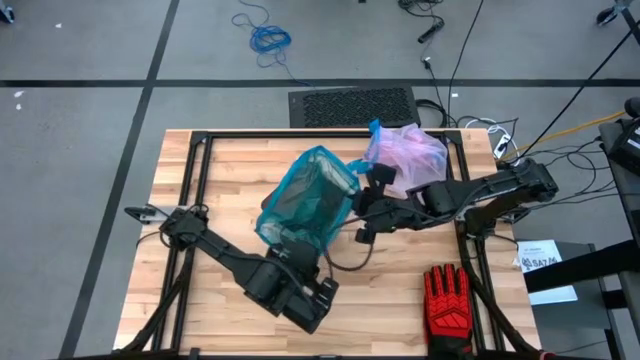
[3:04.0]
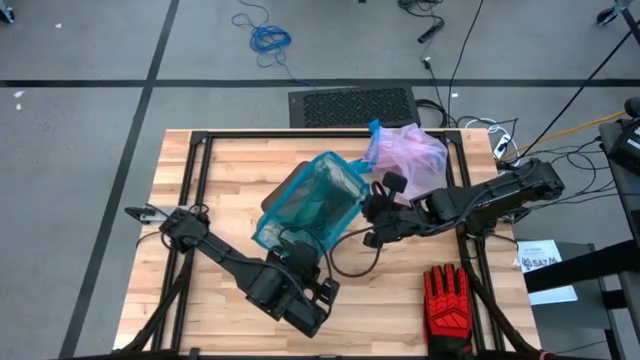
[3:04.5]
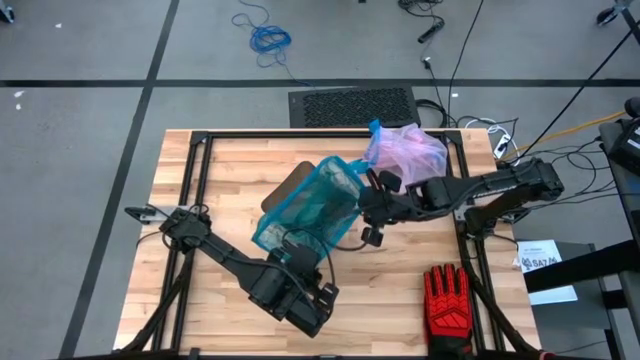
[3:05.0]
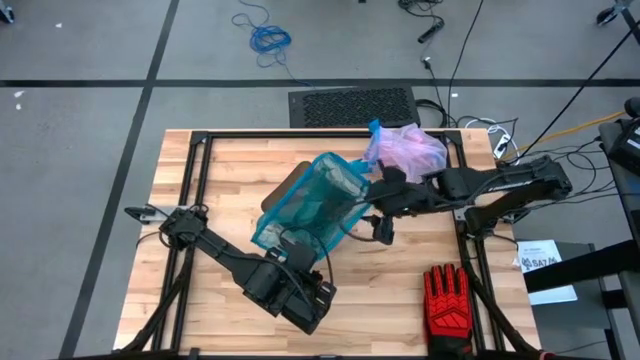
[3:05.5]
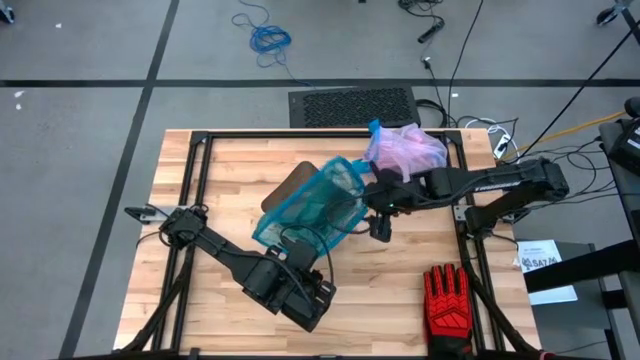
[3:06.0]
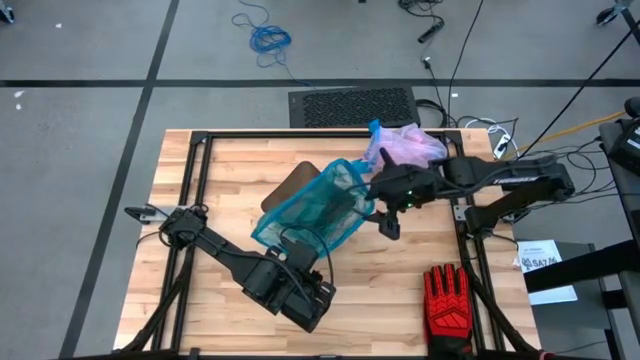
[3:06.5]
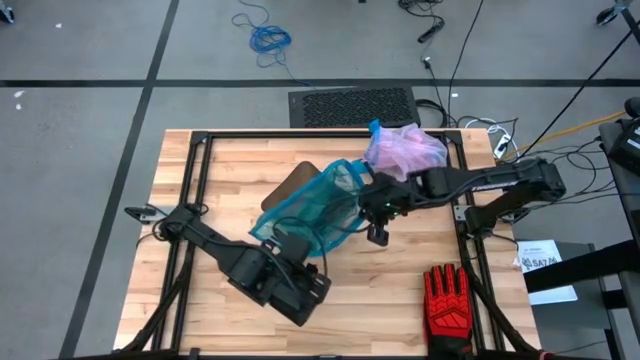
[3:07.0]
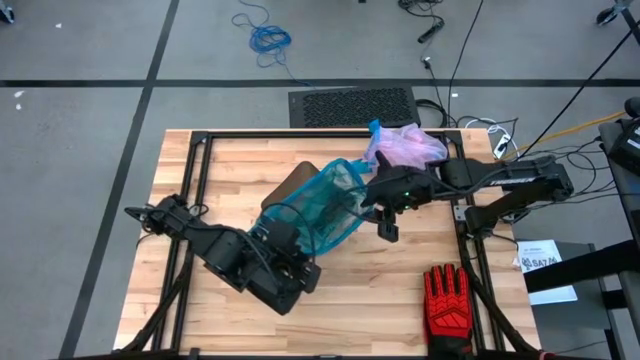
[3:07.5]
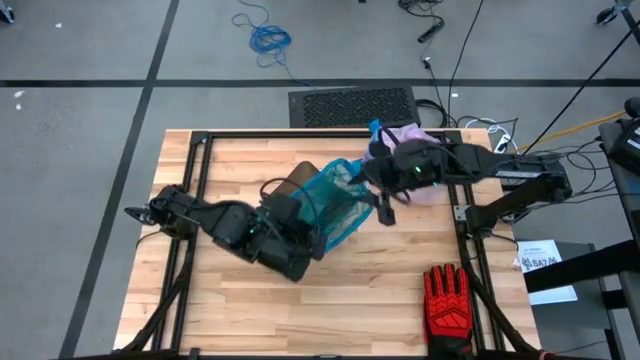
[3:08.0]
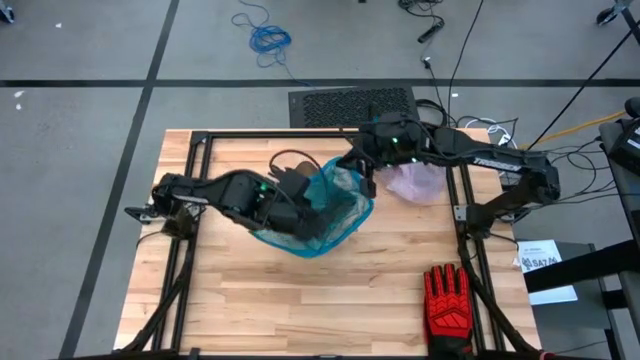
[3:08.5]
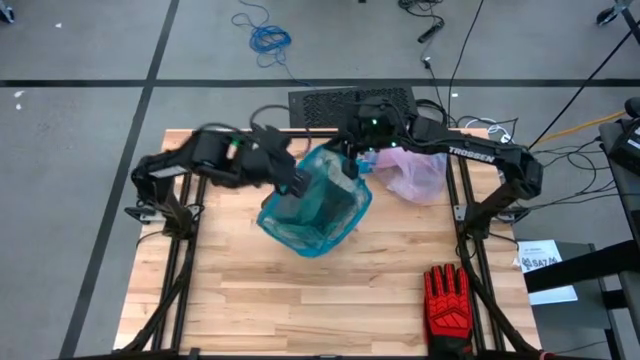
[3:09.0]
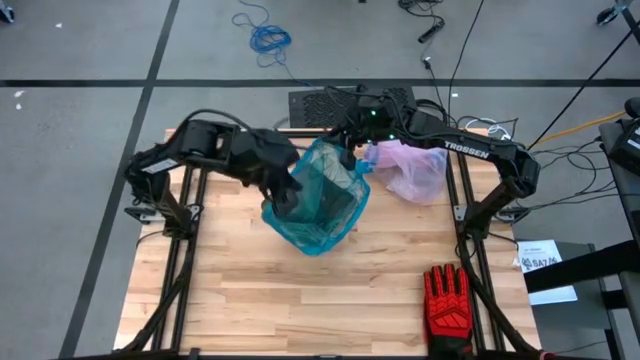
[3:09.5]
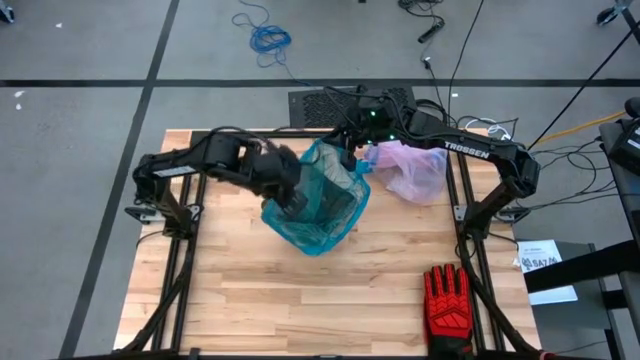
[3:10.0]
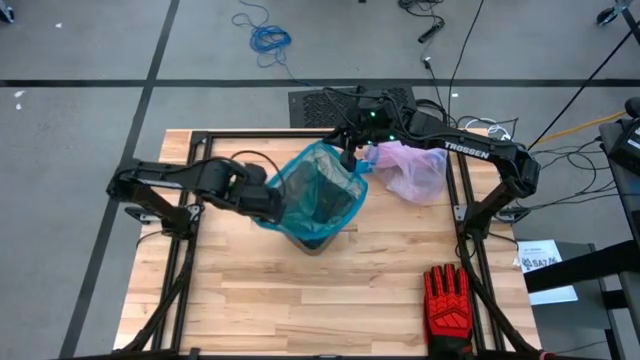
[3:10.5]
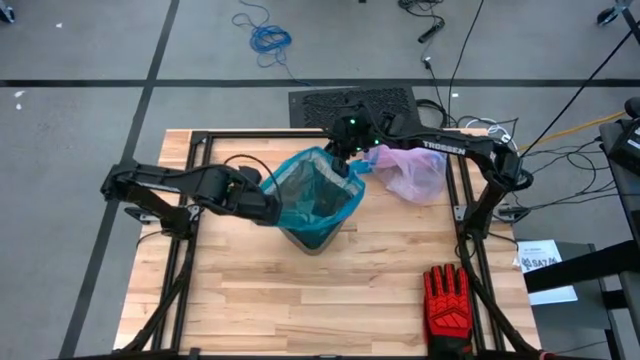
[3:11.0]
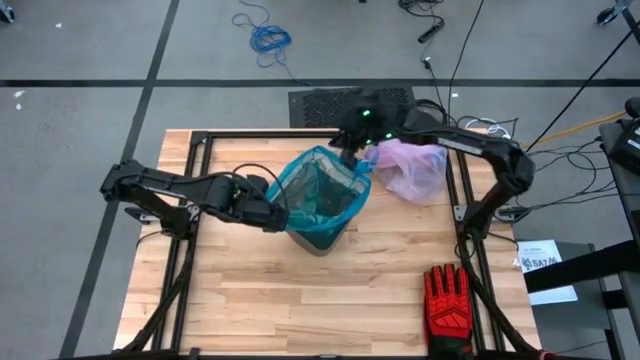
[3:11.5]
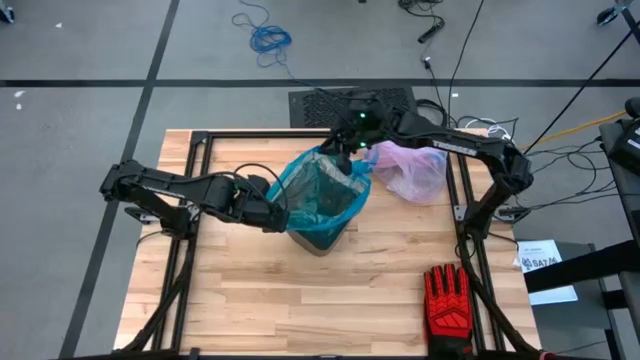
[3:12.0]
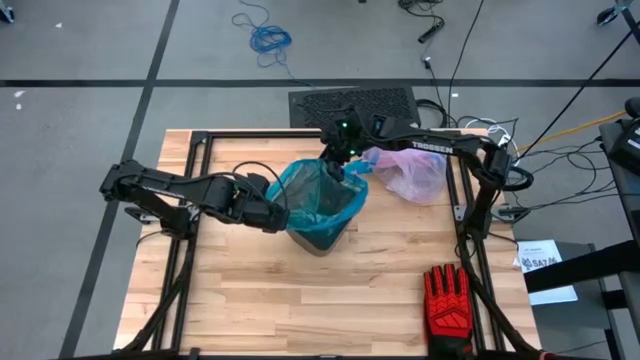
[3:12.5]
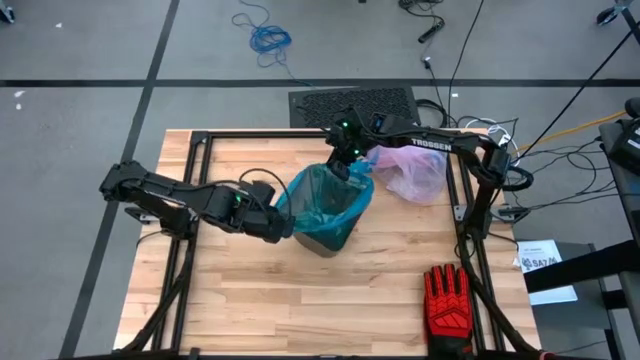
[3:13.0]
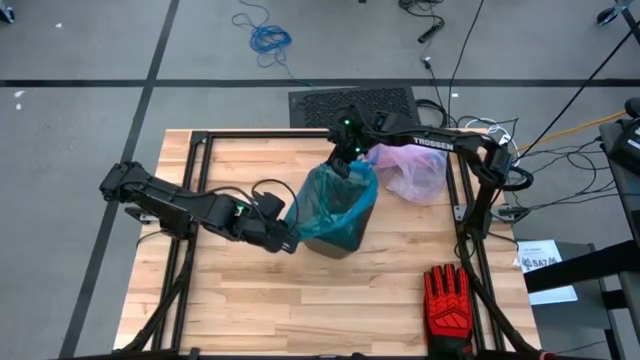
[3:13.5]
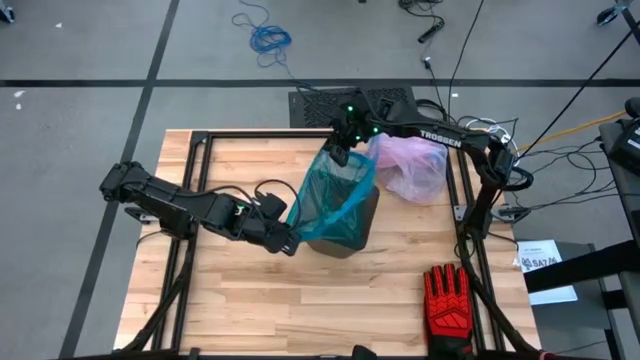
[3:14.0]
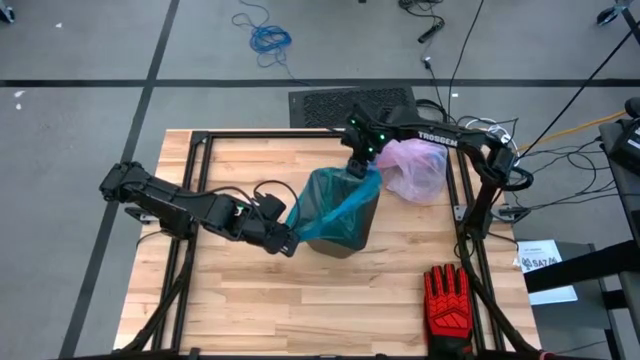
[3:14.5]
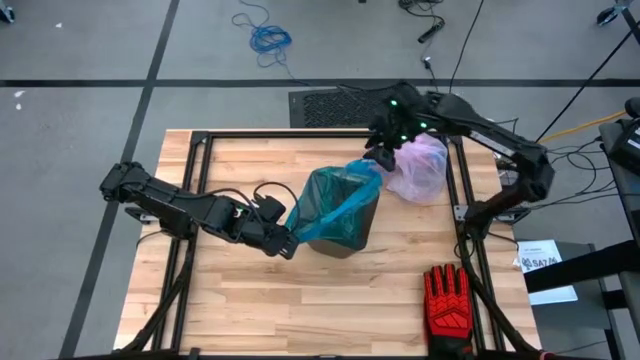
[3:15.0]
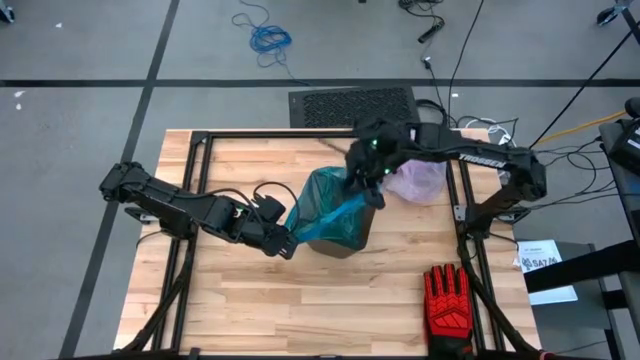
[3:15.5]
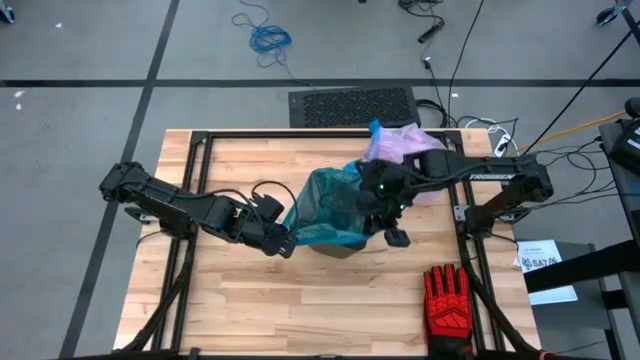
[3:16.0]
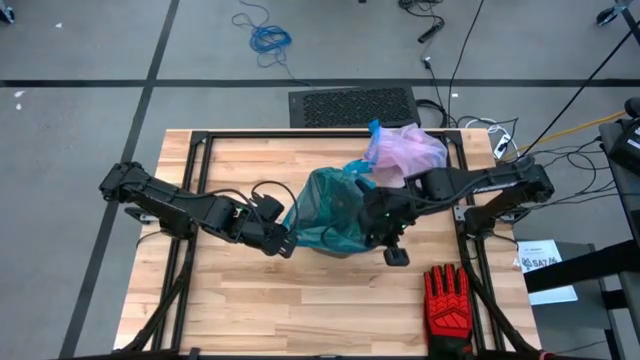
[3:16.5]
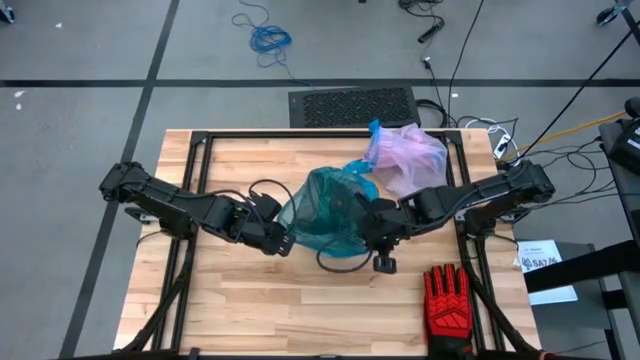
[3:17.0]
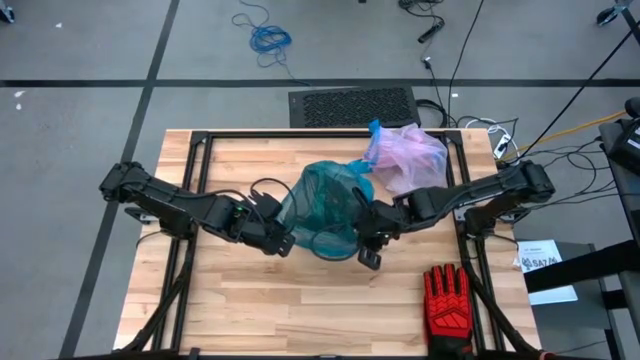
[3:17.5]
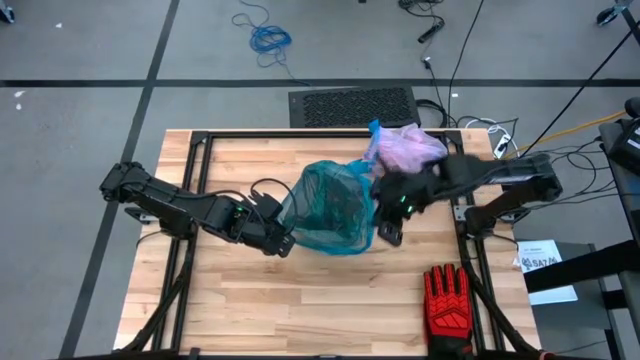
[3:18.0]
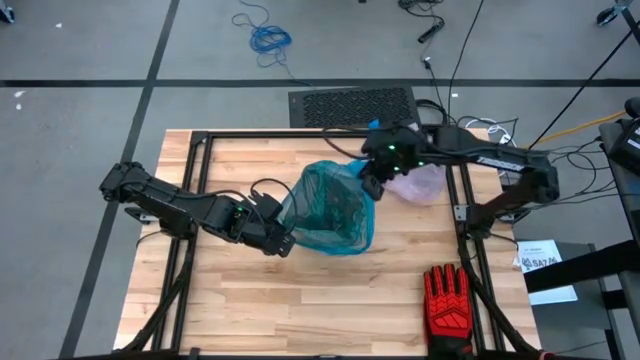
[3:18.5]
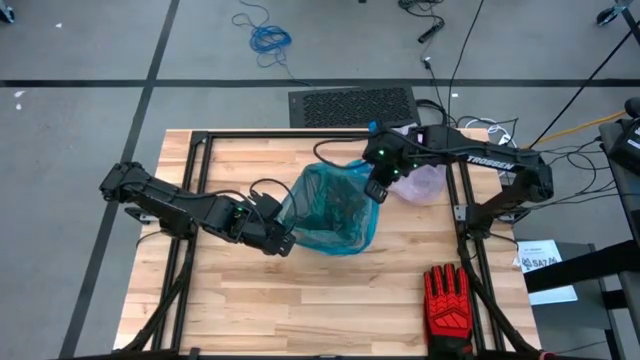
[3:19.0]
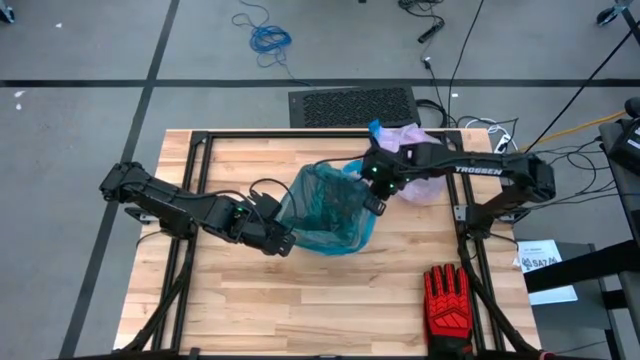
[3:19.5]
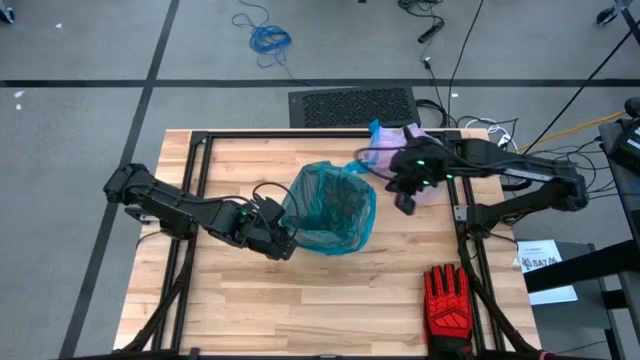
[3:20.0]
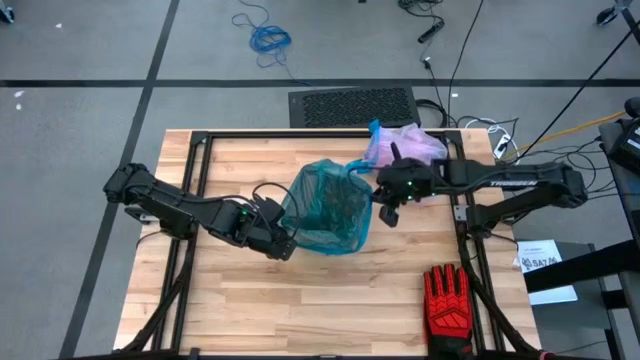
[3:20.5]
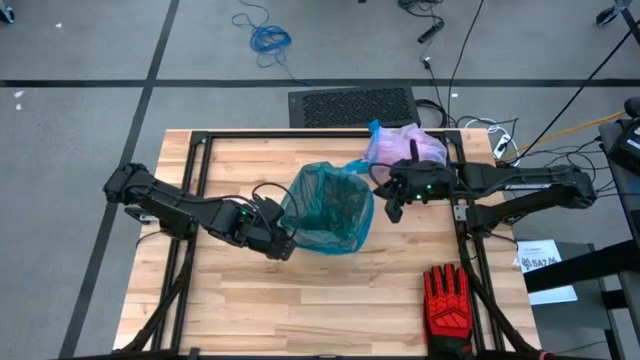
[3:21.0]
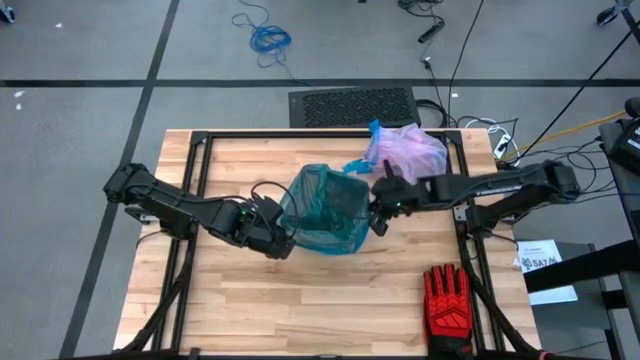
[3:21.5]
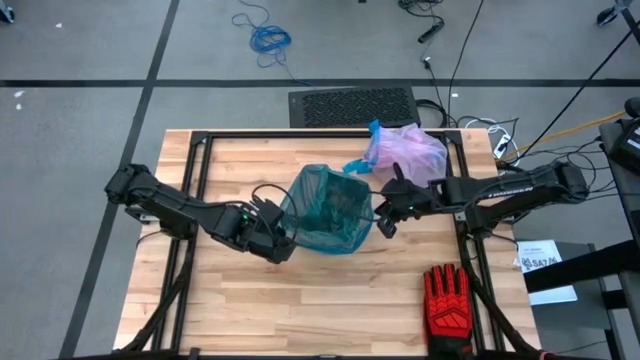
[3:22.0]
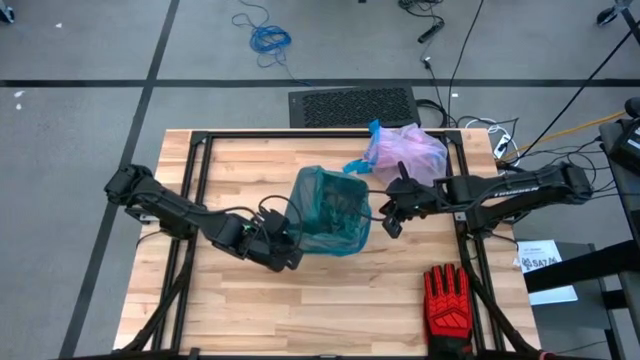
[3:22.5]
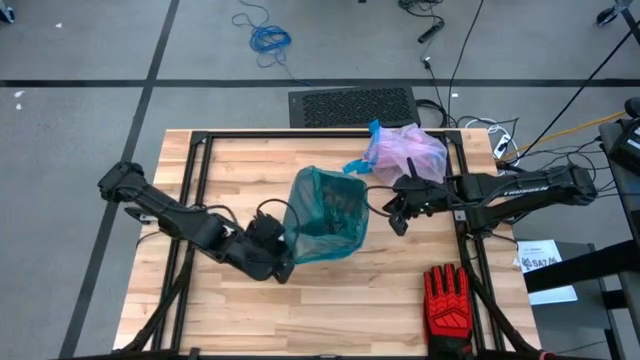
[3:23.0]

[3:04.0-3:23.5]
Task: place trash/remove bag and relplace
Insert a new trash bag into the bin
